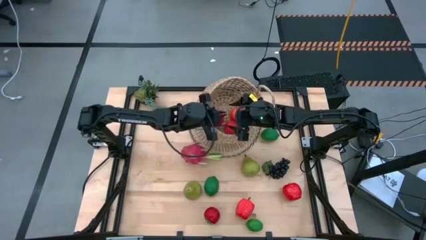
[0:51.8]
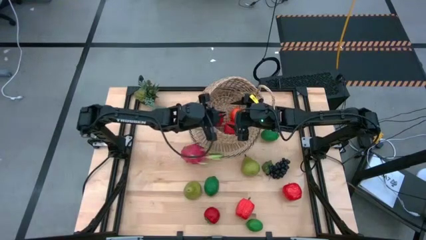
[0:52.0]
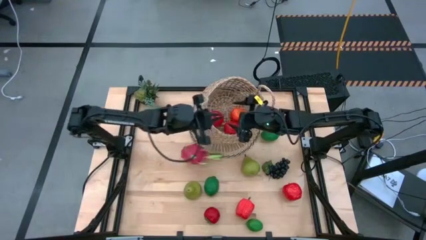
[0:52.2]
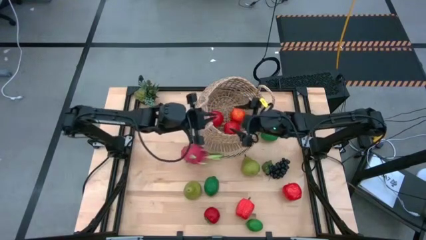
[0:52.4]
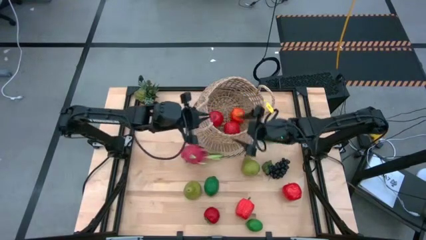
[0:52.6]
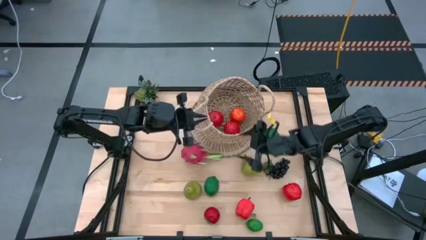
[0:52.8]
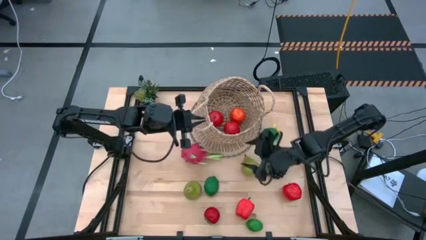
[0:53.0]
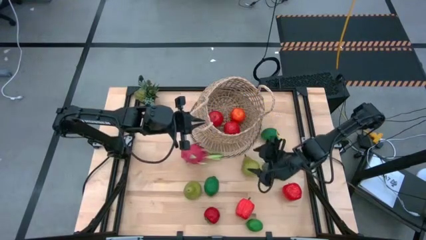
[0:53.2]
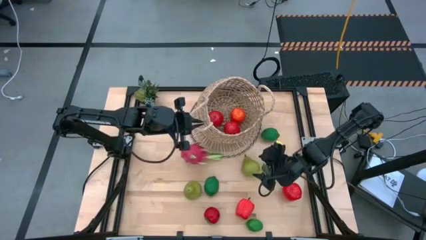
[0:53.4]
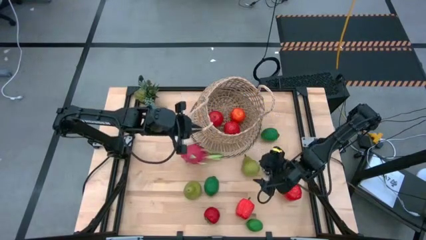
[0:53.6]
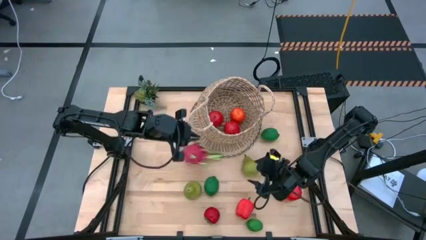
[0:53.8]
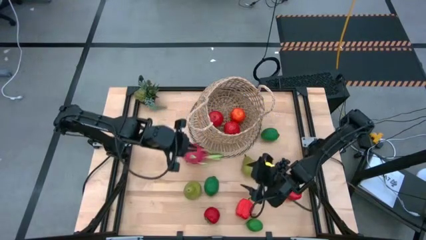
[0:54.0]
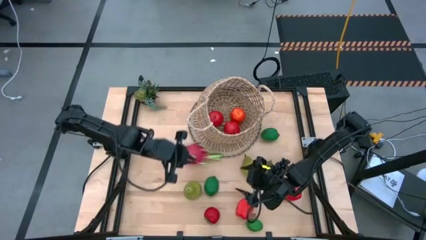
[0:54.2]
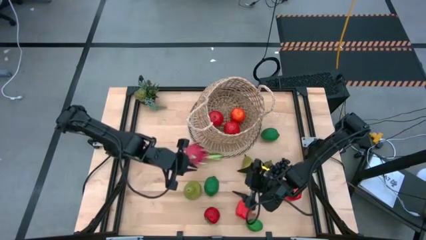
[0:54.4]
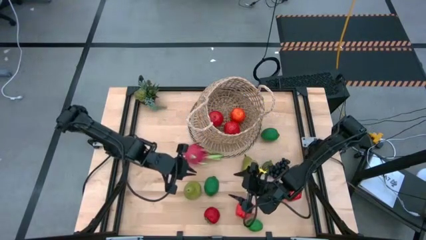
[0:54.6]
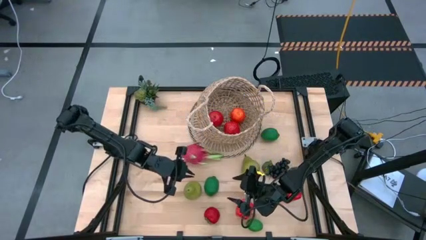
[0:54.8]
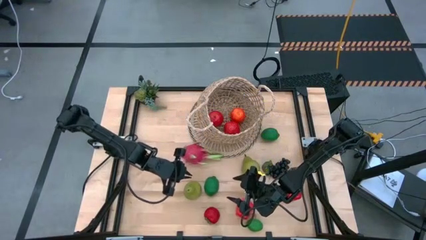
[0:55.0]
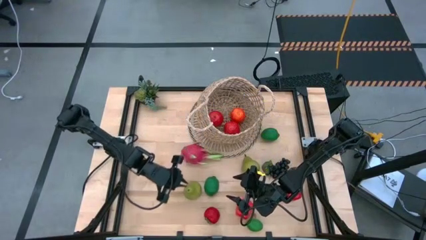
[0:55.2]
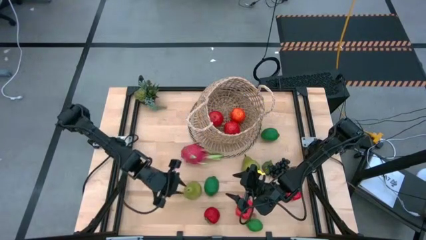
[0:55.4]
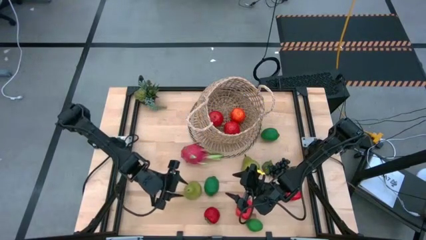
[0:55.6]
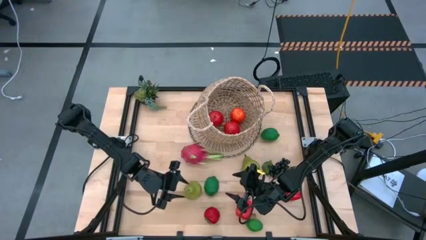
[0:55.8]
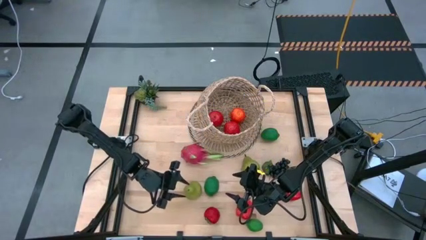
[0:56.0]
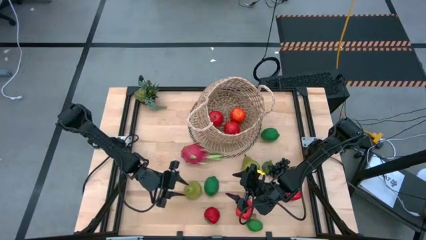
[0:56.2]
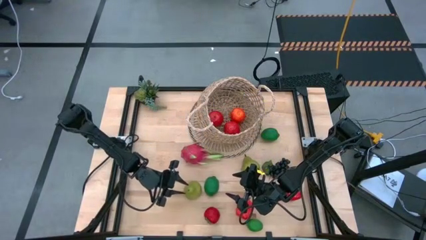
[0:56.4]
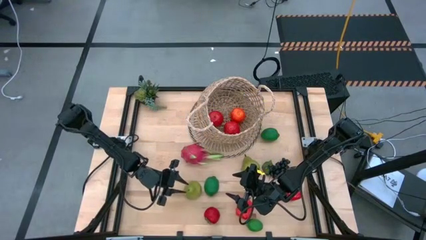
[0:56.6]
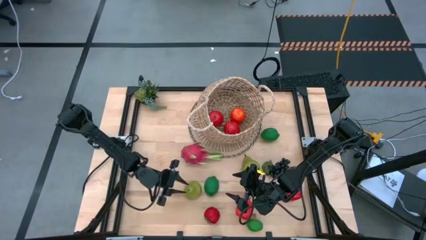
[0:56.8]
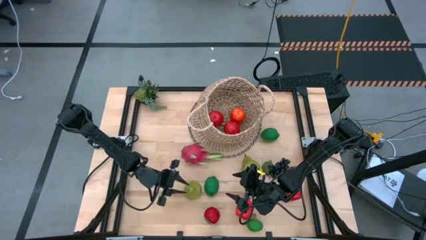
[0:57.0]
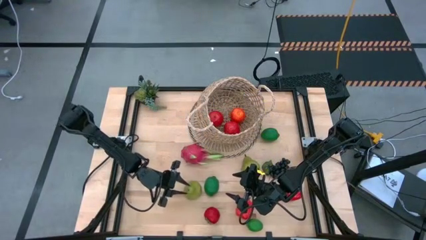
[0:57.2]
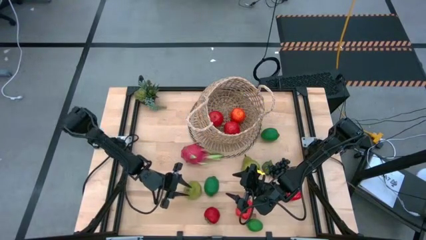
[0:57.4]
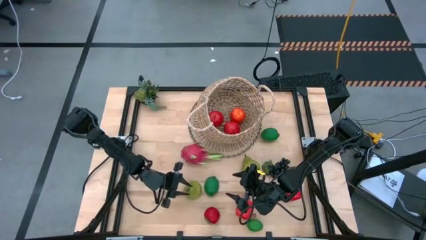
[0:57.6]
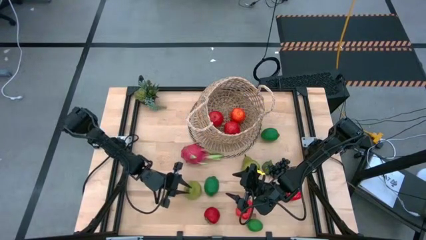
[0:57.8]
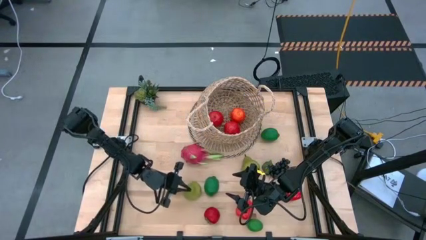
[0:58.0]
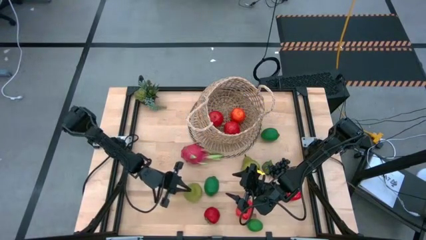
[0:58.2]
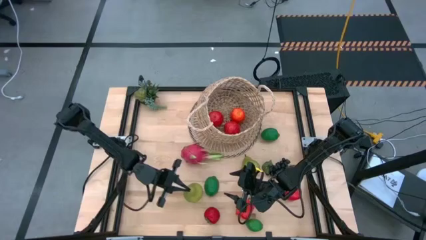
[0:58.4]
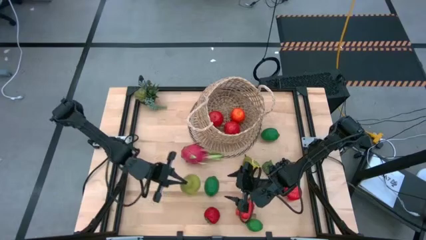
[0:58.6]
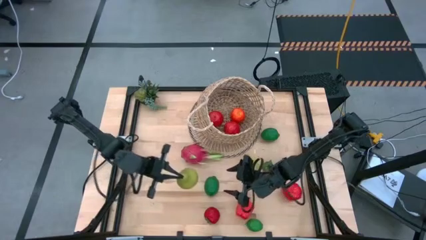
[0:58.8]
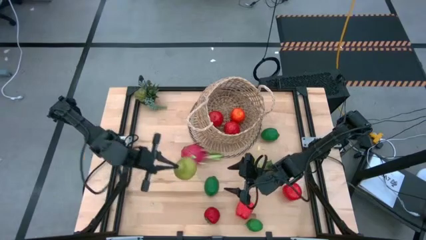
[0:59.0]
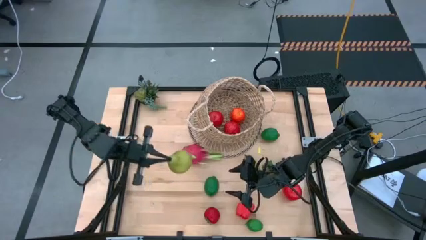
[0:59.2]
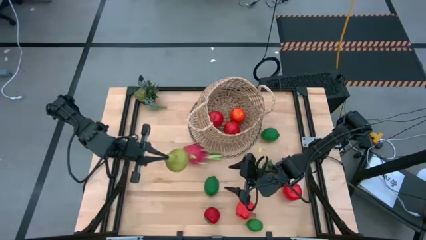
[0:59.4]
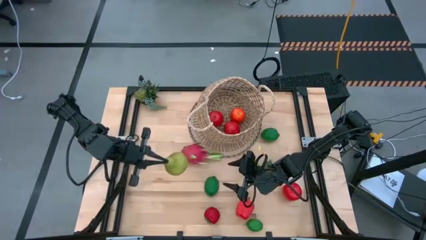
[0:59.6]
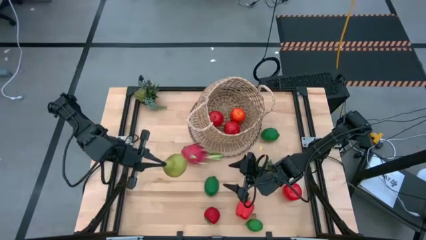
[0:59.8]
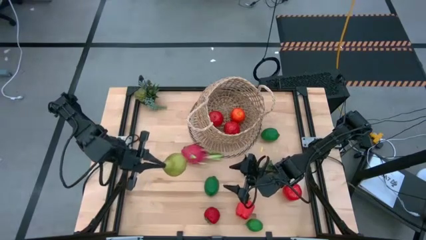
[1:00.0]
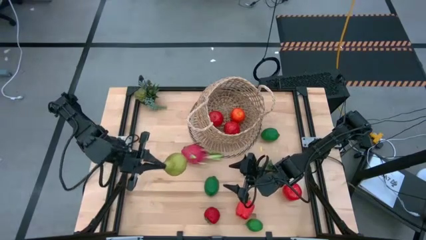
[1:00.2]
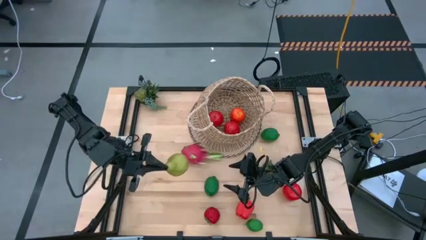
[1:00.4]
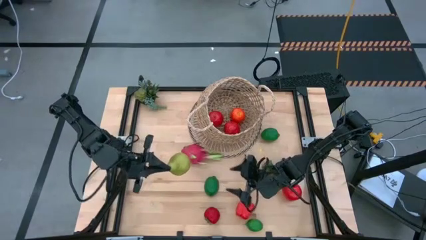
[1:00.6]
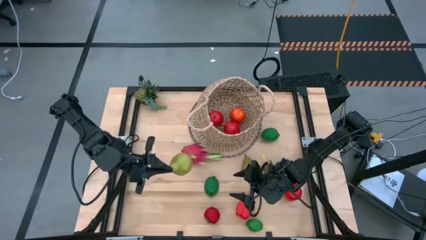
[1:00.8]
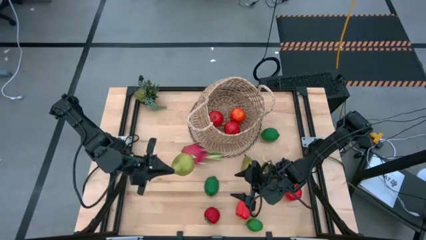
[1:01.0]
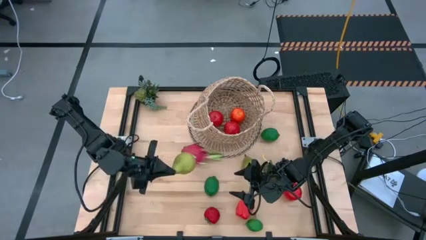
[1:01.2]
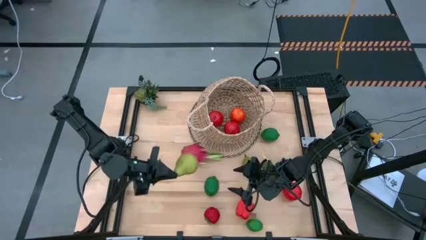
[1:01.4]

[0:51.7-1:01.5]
Task: Build produce basket
Put the left green pear into the basket

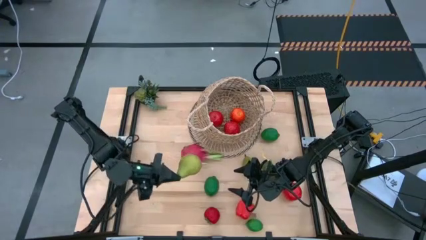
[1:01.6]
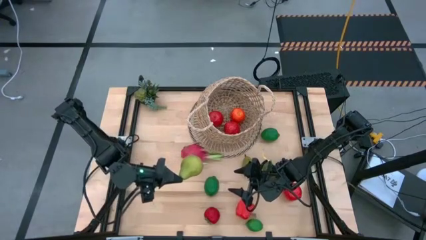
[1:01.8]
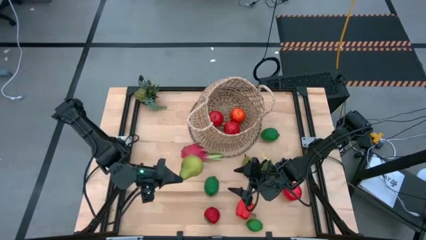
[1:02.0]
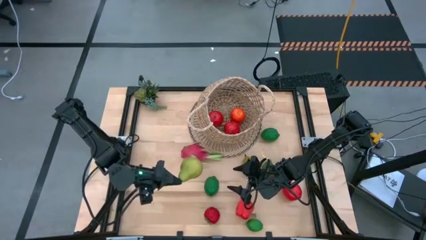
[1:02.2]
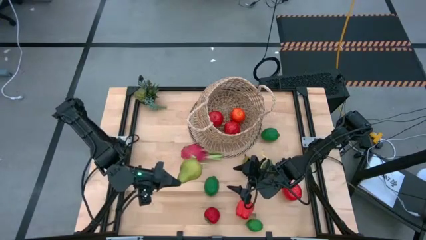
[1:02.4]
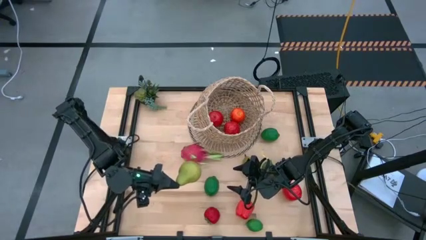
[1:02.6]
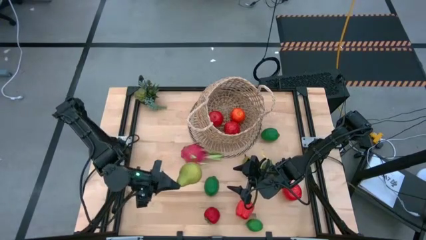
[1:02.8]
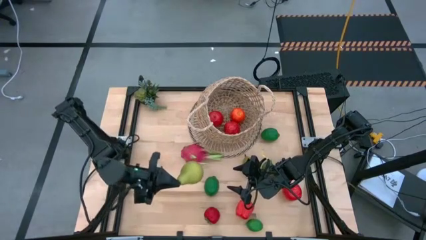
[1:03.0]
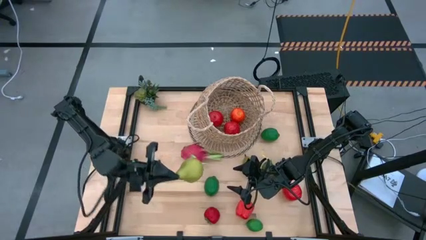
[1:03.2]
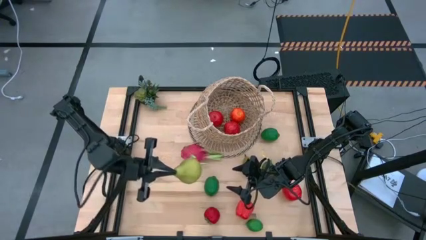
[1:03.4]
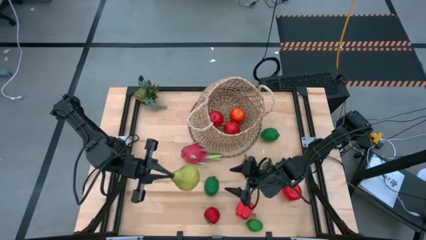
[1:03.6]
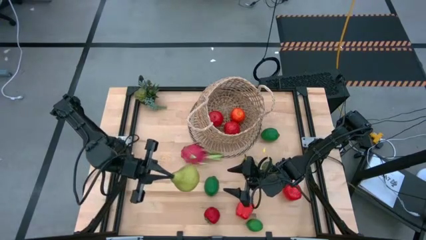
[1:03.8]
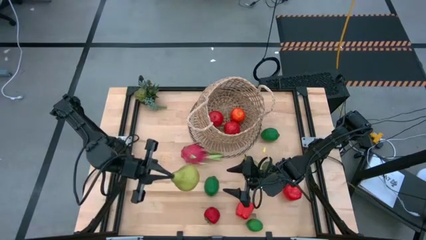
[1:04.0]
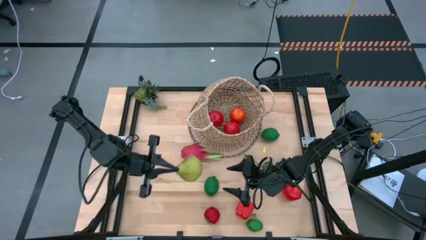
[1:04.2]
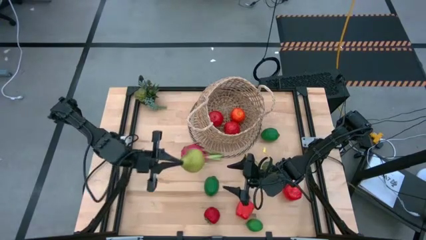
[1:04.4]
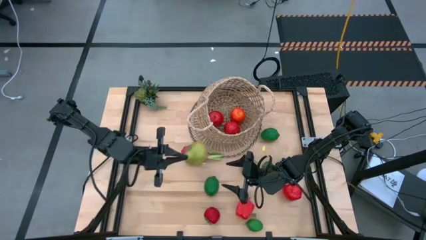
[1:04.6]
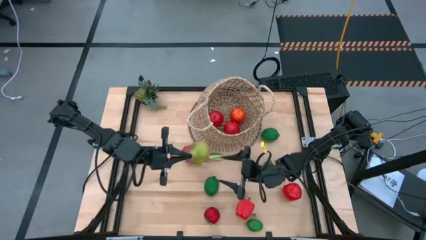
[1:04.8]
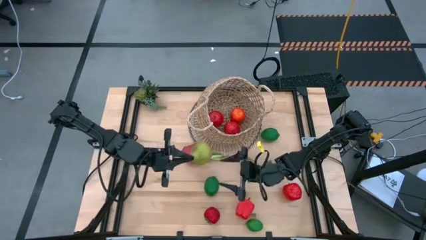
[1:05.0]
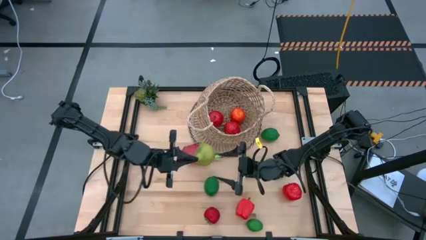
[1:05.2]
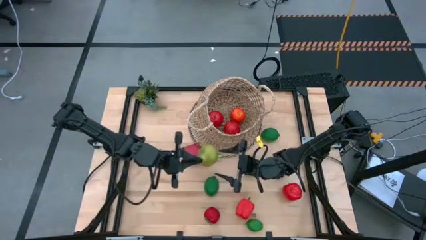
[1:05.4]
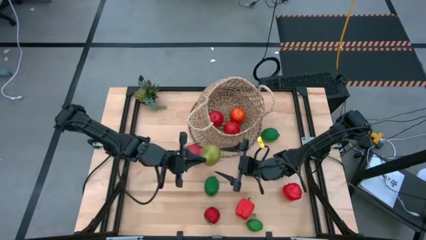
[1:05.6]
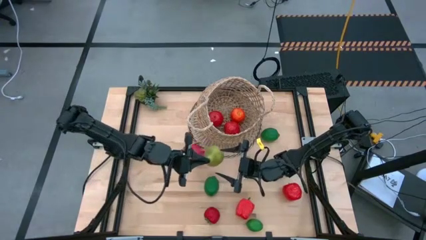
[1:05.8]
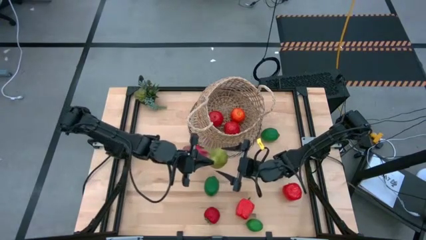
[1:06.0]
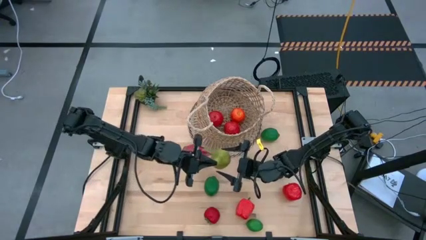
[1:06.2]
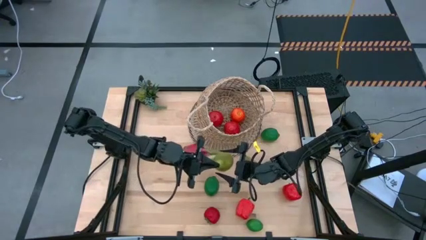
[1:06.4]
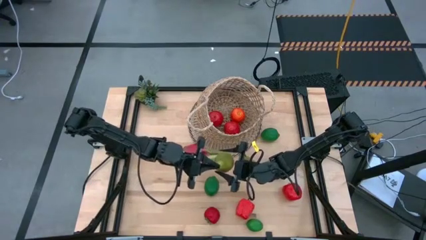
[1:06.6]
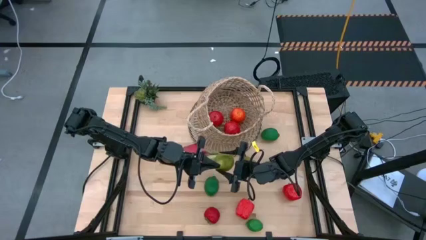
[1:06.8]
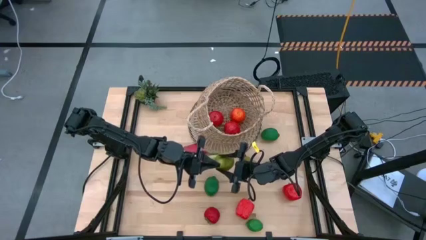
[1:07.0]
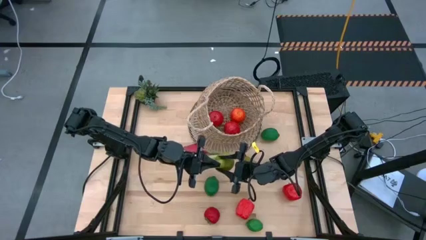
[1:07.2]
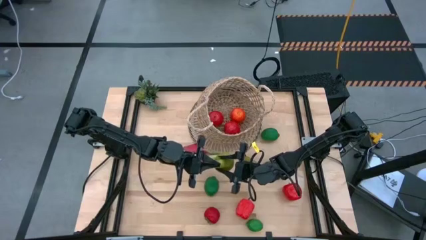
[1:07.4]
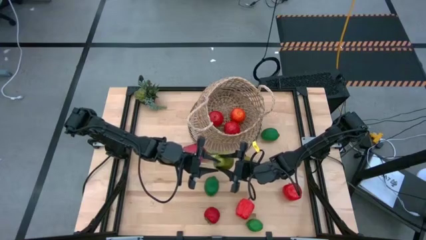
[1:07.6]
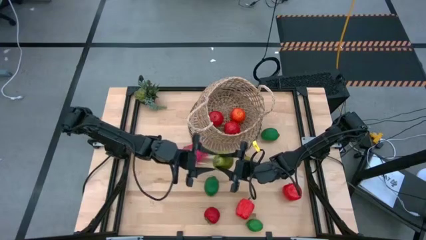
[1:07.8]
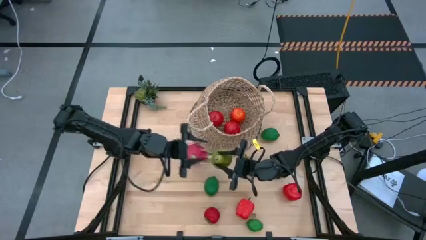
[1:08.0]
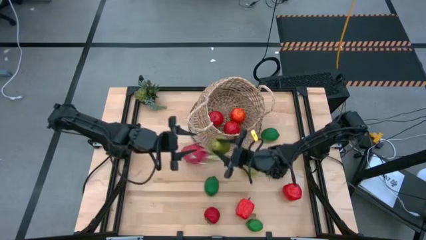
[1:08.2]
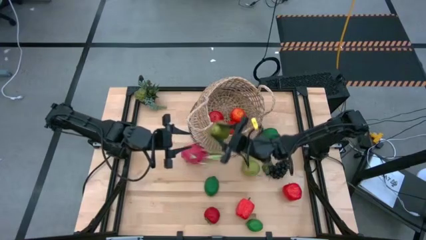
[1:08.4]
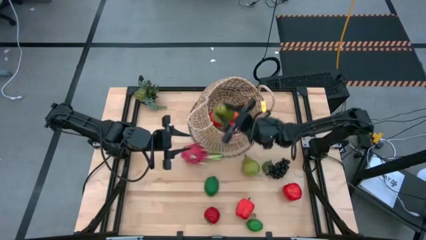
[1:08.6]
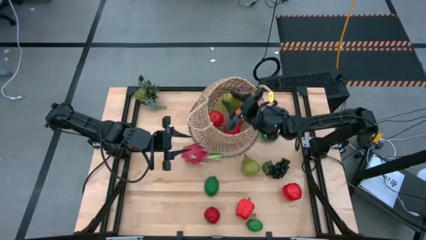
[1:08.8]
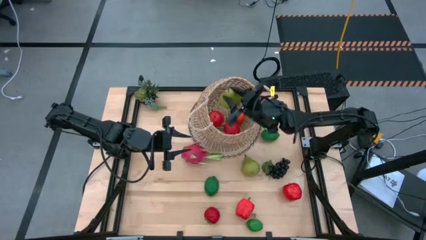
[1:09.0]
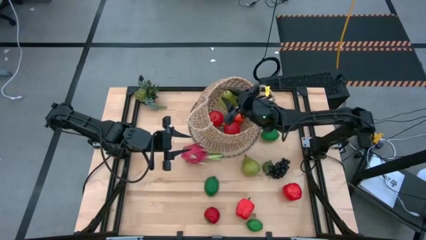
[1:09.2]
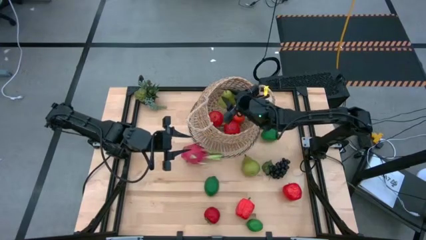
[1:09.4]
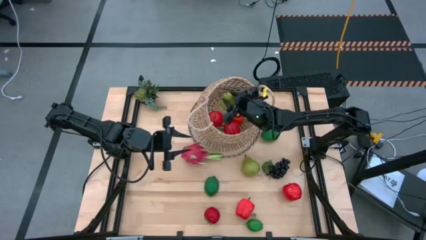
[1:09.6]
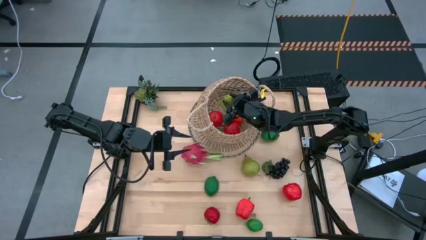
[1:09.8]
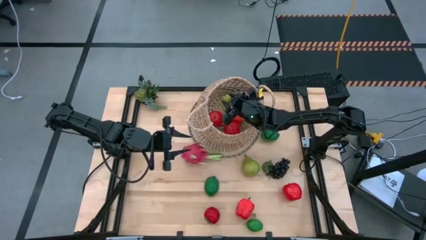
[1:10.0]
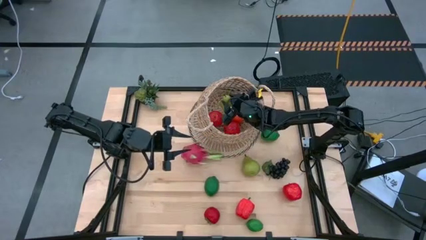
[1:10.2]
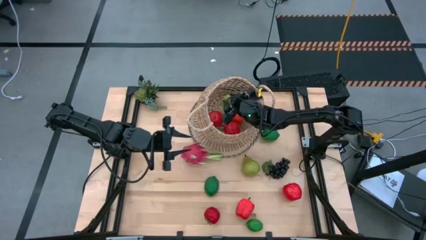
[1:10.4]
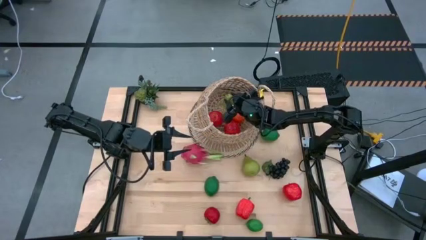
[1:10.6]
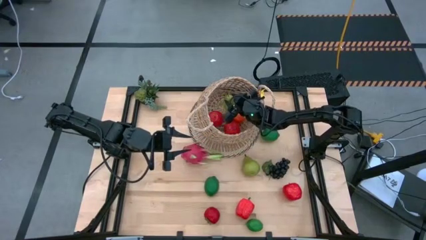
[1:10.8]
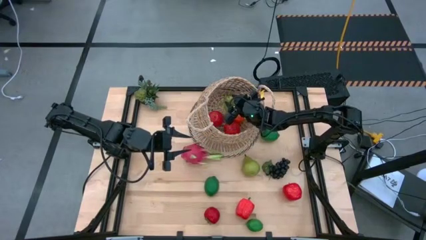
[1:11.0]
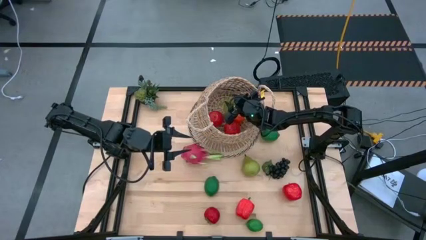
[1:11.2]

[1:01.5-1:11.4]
Put the left green pear into the basket
